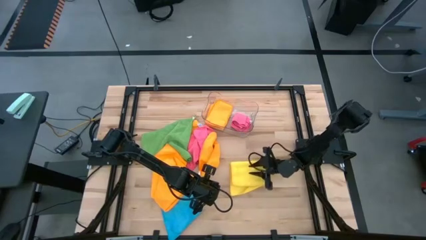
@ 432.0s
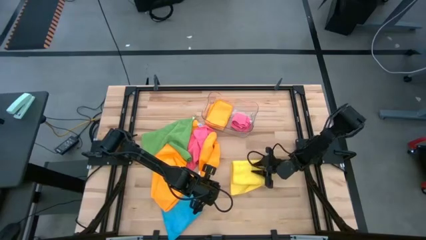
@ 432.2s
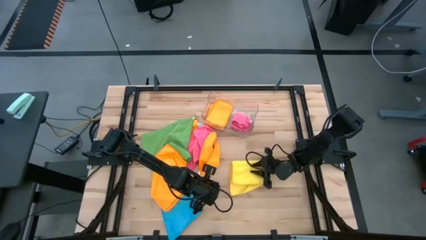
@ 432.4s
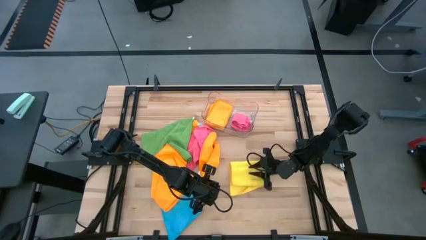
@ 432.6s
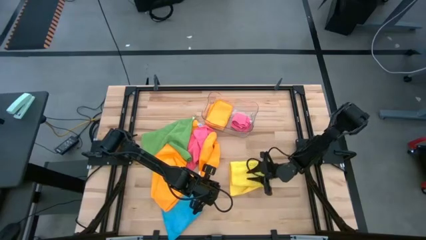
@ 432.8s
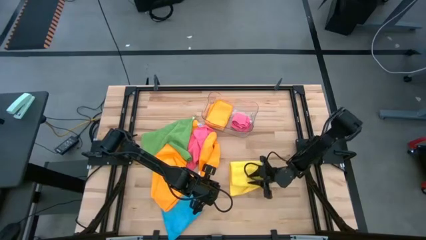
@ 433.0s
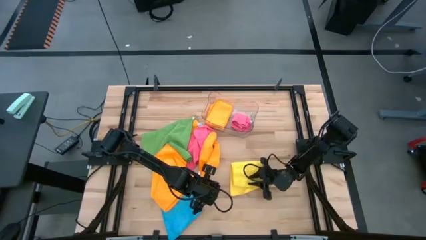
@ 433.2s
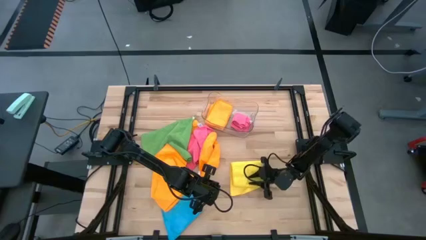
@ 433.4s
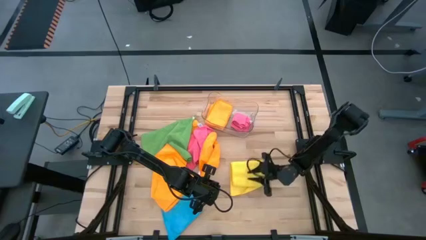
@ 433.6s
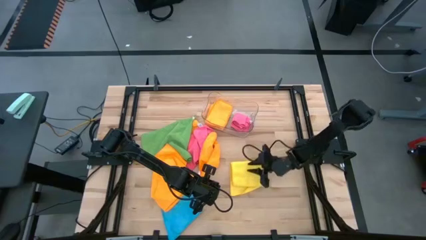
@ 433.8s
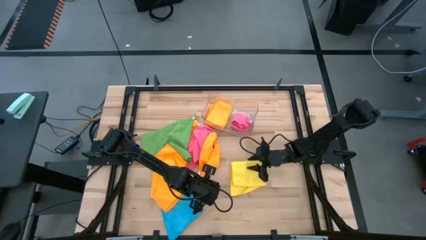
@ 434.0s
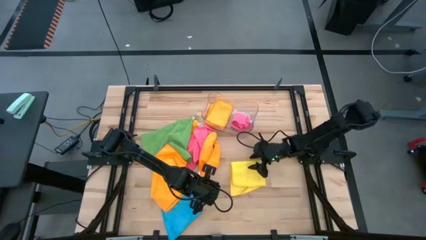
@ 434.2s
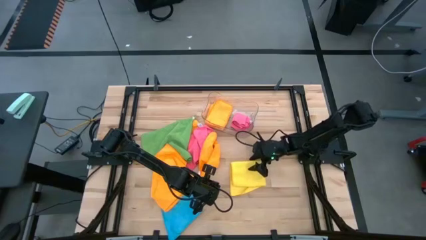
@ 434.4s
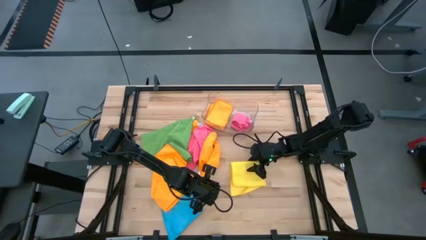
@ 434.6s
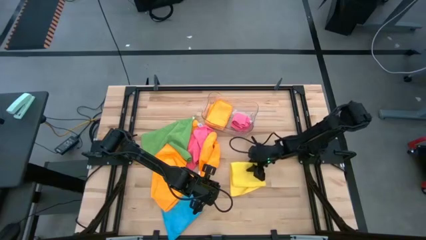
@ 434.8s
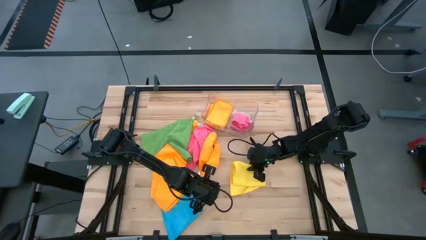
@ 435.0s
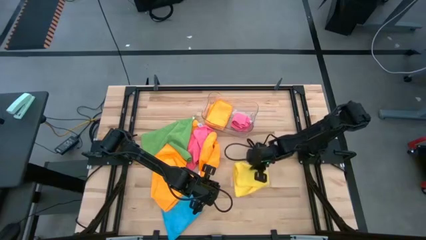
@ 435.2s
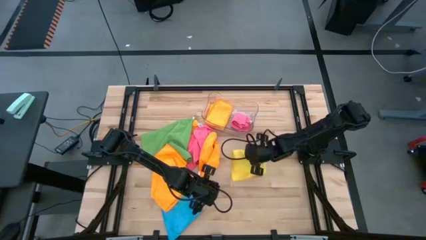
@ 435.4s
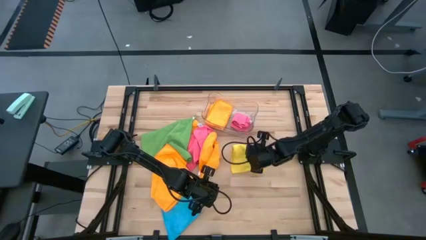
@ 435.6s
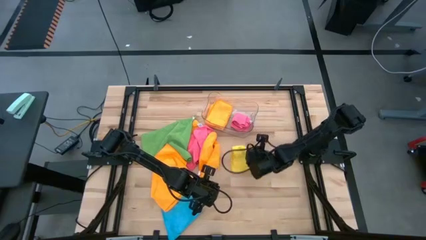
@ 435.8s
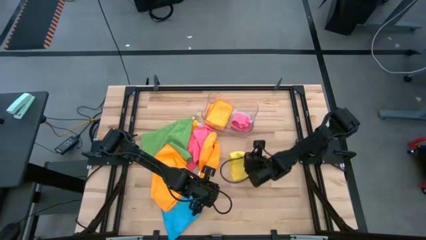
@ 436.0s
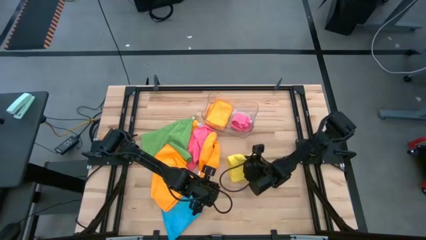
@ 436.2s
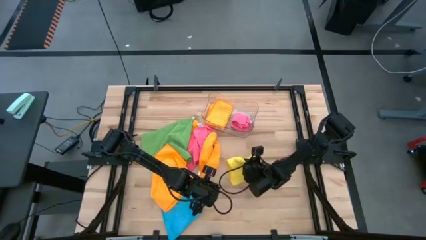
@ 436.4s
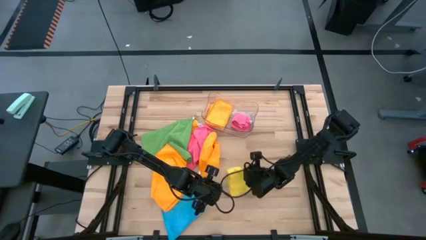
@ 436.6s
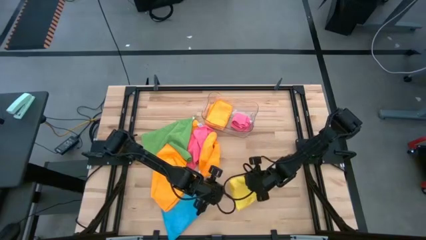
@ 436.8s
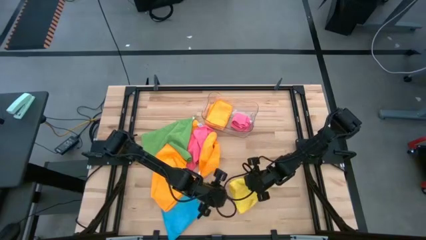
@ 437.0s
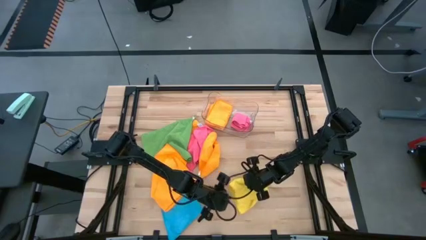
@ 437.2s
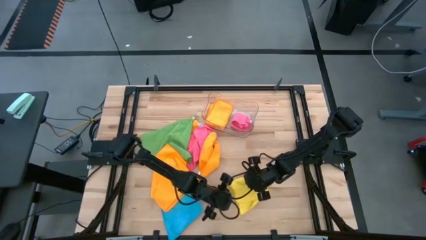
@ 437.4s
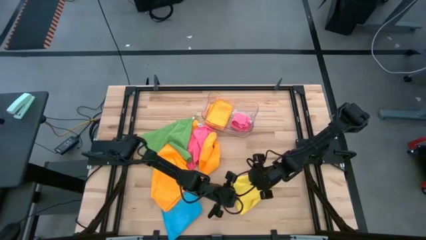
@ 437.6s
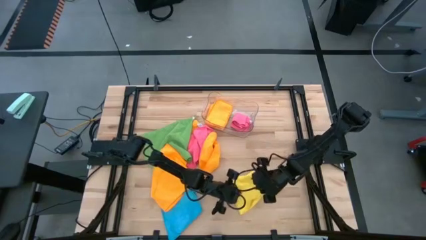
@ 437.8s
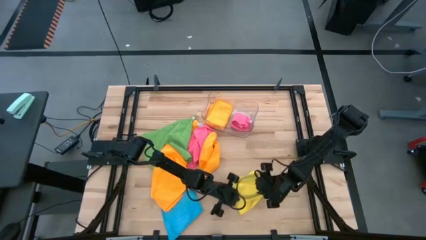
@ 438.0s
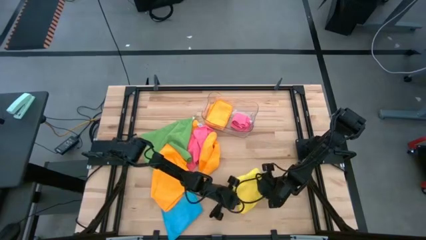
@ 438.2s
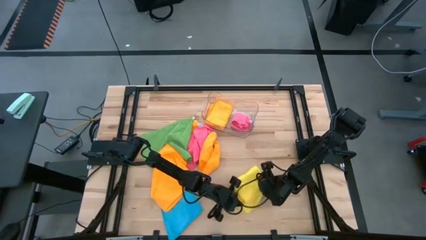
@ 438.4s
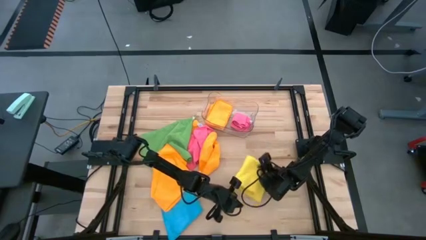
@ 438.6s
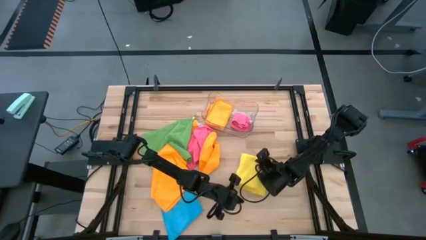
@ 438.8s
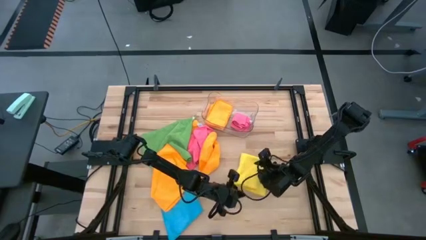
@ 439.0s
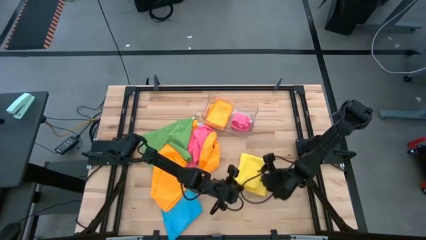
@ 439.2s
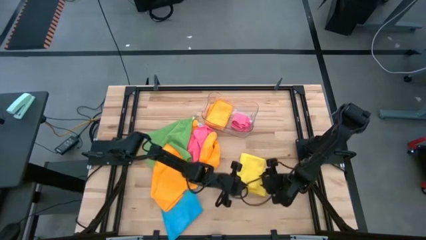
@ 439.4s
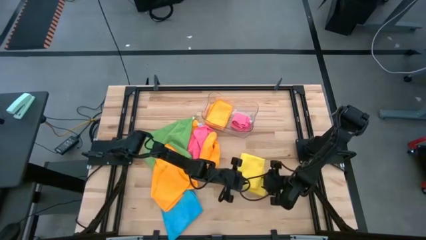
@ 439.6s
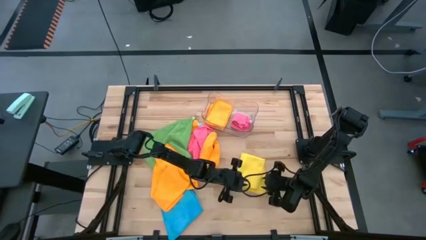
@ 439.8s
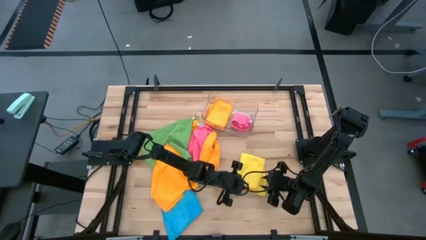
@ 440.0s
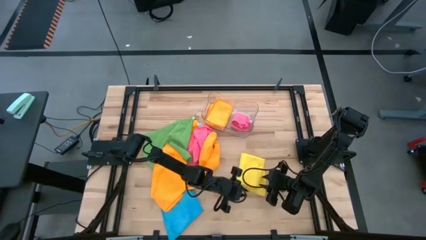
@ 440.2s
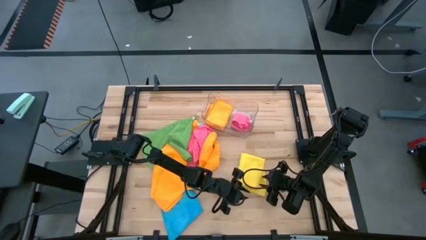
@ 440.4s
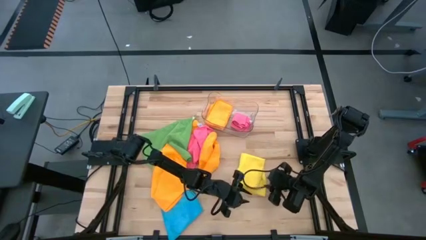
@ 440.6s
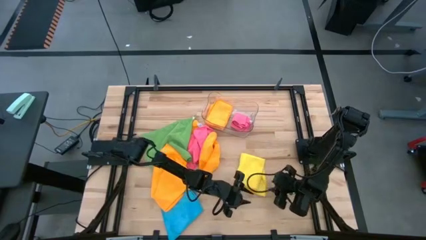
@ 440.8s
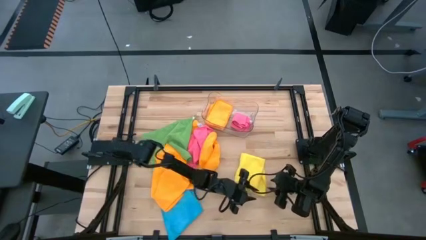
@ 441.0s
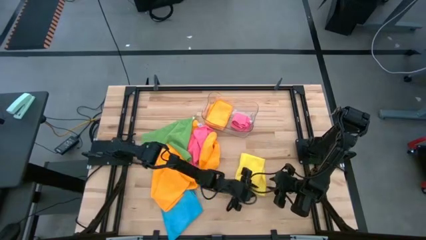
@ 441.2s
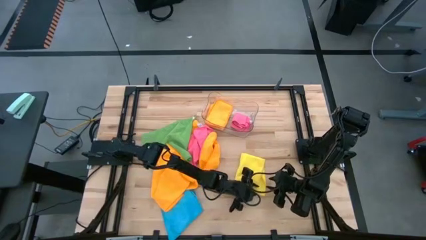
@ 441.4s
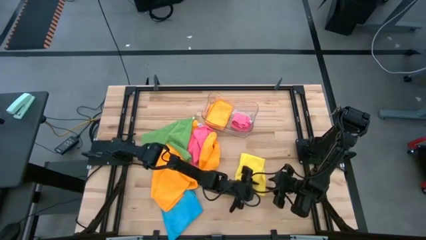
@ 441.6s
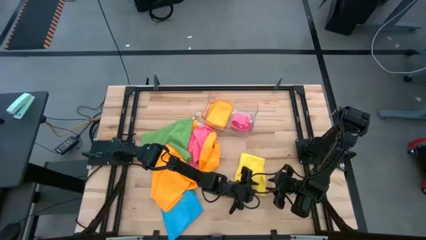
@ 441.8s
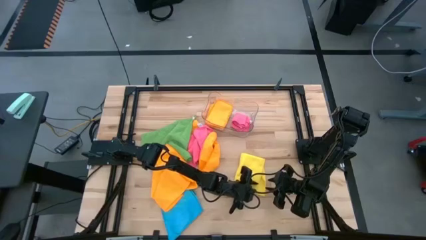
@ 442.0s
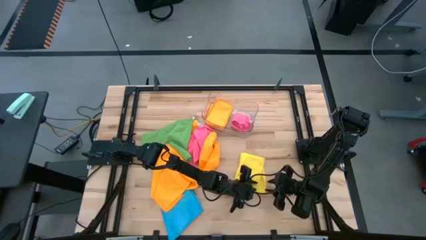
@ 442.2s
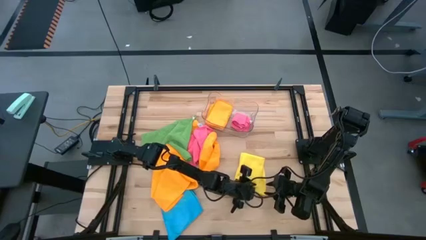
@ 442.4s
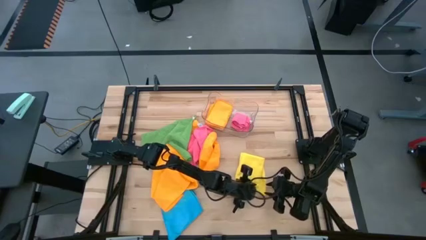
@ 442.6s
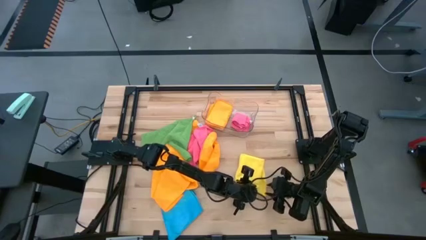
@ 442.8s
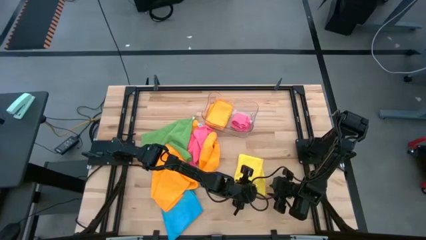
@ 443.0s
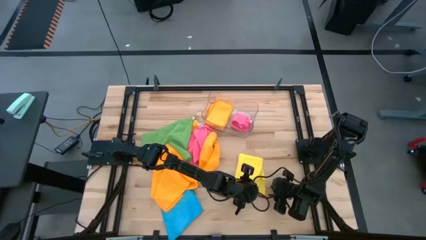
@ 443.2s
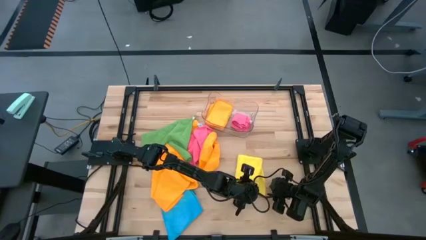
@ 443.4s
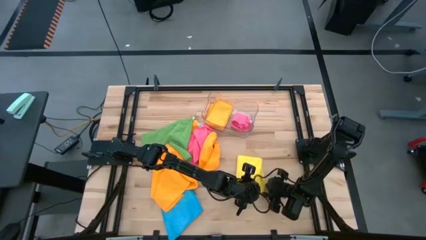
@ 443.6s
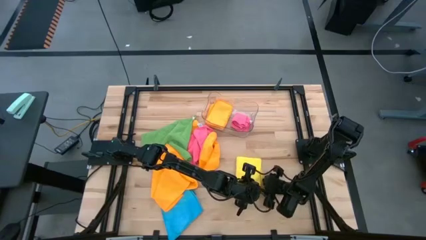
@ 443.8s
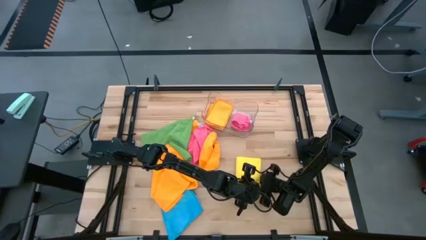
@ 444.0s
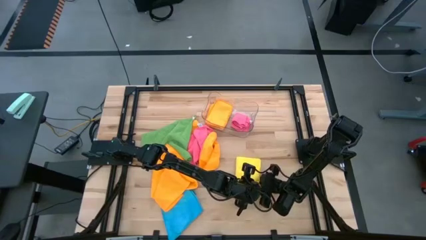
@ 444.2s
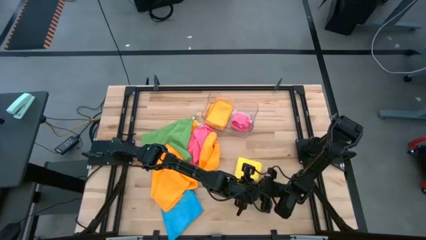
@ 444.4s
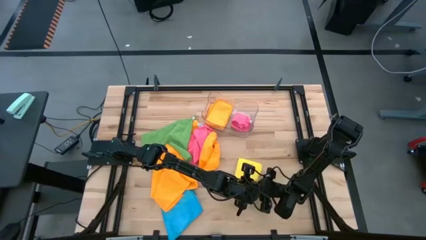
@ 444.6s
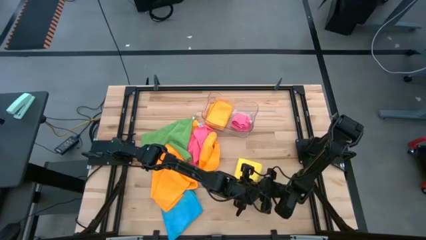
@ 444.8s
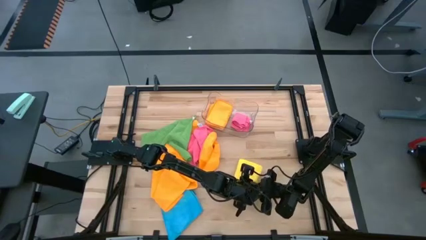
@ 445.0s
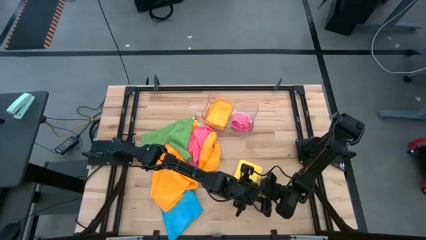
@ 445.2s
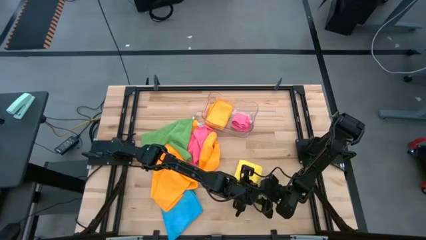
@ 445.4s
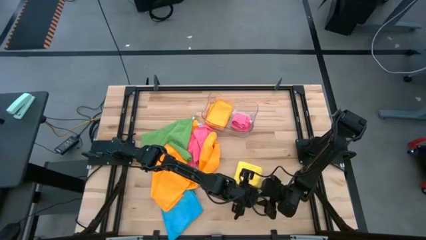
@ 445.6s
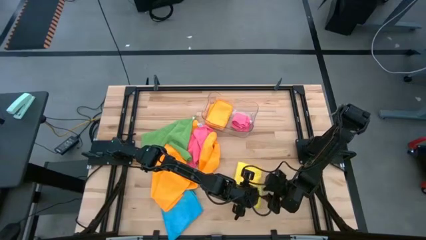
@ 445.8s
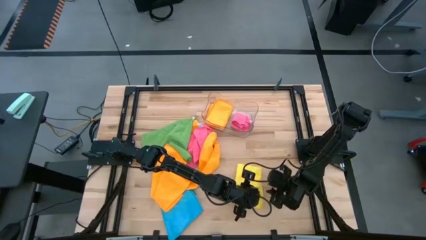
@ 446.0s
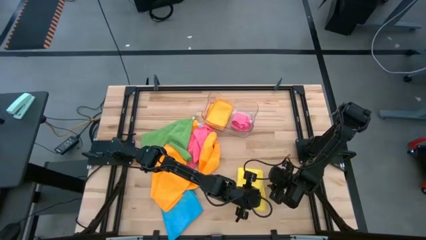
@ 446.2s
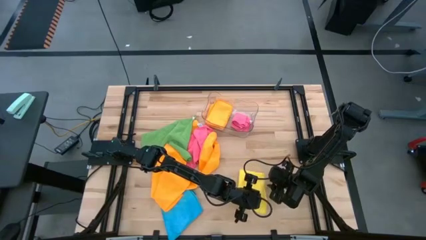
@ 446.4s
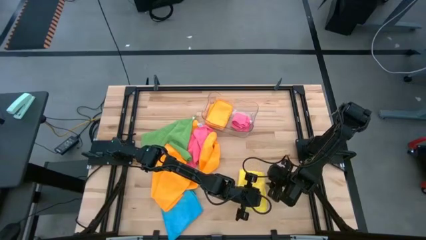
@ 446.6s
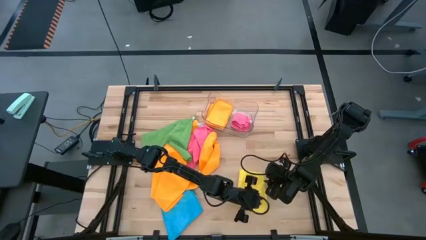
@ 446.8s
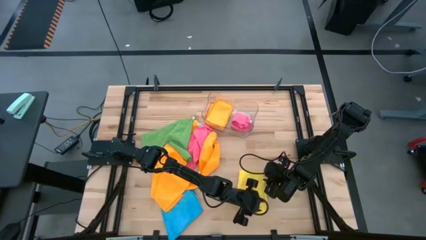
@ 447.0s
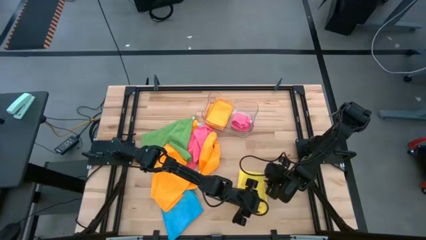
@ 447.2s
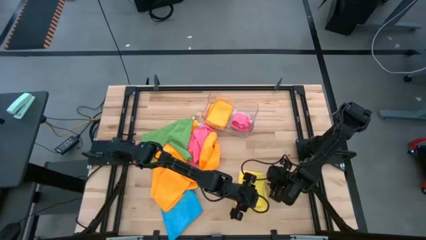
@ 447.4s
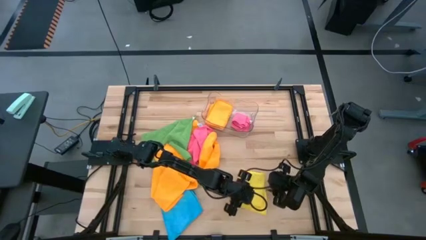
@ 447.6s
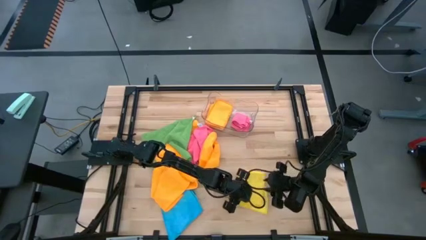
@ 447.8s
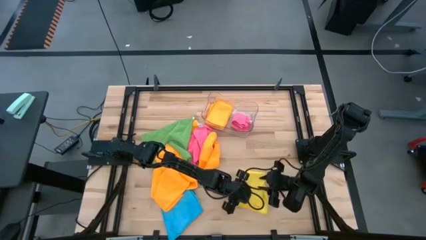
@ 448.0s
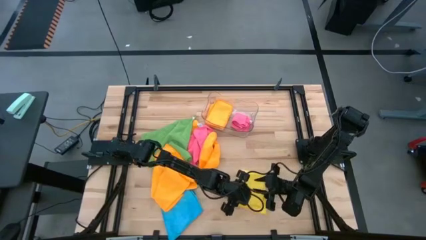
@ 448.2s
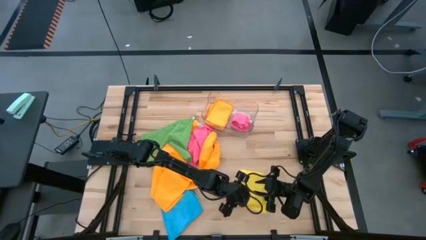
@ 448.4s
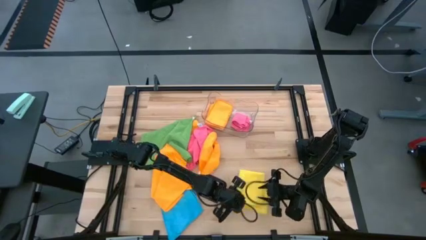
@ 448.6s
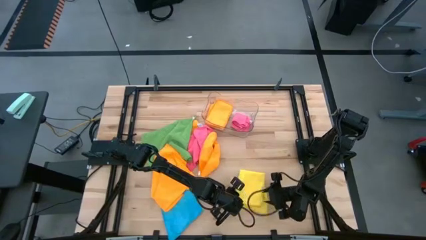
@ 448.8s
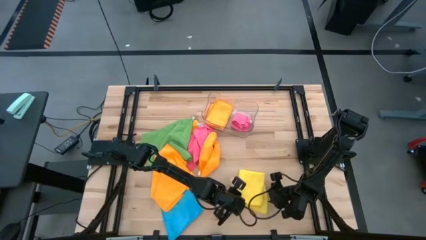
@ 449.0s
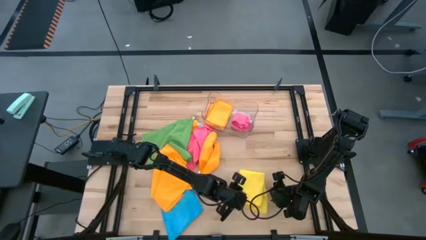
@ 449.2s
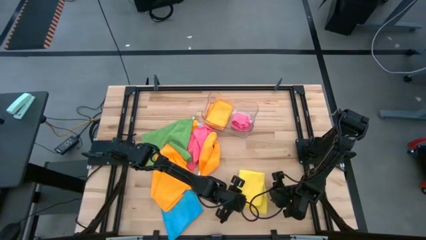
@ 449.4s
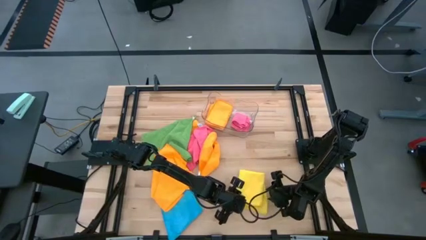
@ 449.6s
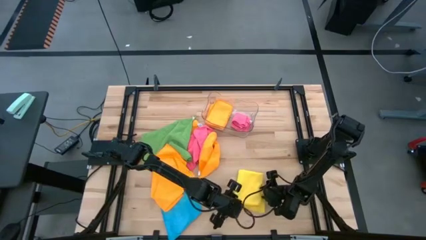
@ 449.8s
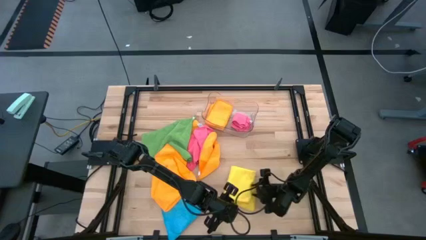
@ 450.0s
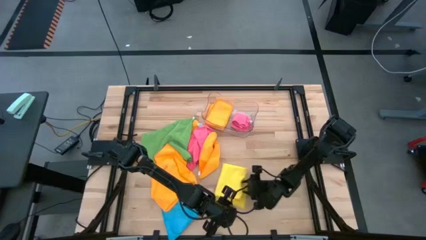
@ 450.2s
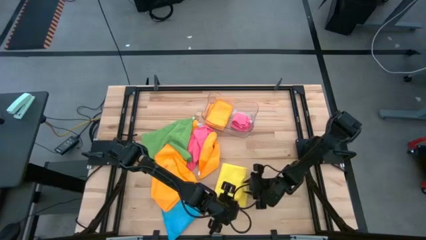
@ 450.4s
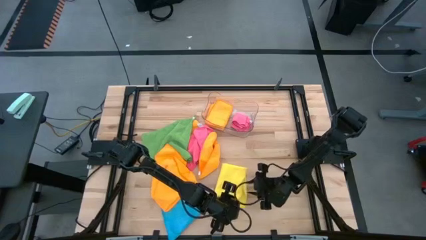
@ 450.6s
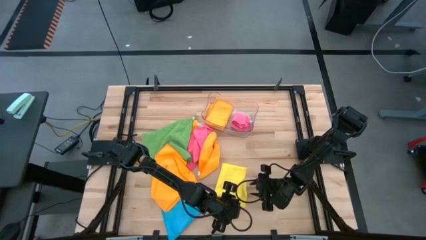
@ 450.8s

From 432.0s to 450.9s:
Task: Fold microfiber towels
Fold the yellow microfiber cloth
